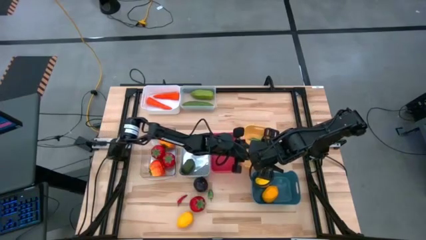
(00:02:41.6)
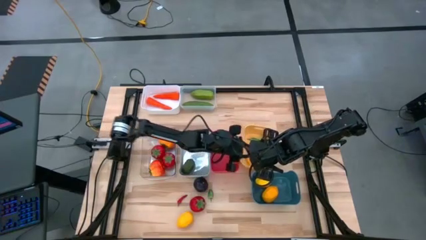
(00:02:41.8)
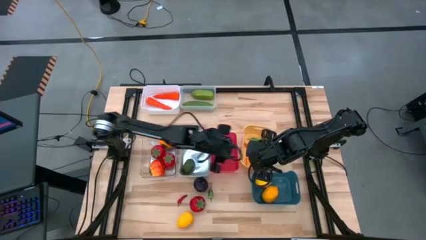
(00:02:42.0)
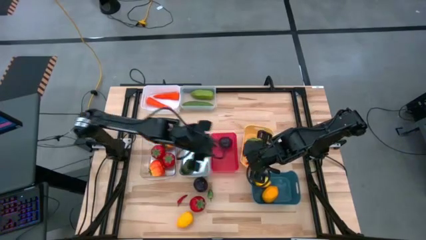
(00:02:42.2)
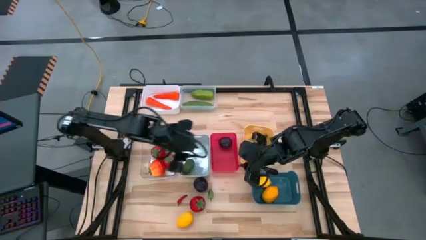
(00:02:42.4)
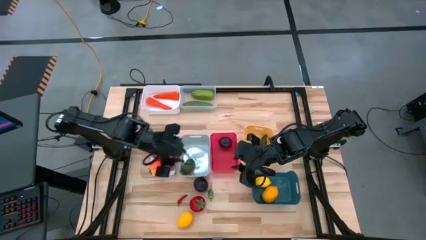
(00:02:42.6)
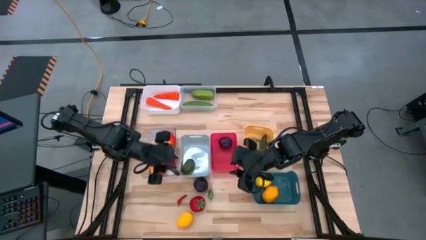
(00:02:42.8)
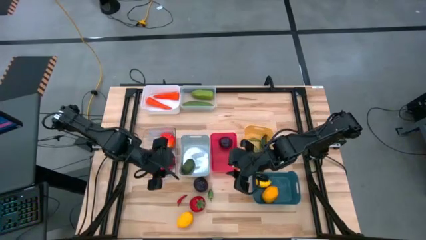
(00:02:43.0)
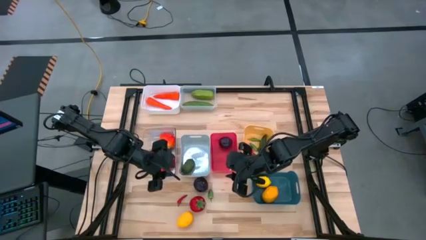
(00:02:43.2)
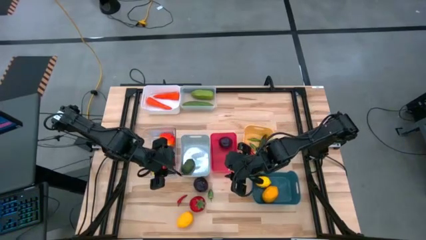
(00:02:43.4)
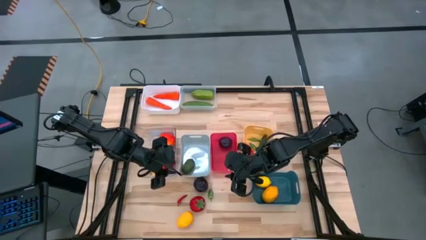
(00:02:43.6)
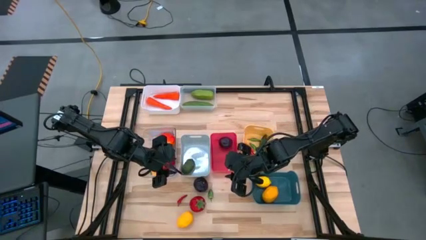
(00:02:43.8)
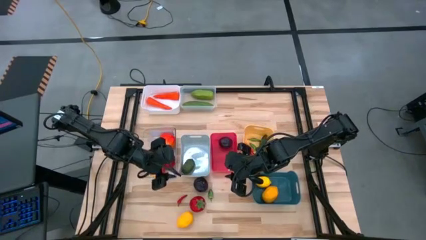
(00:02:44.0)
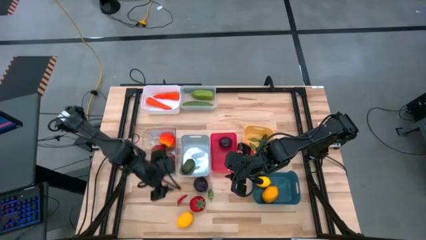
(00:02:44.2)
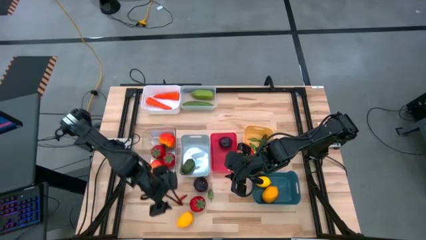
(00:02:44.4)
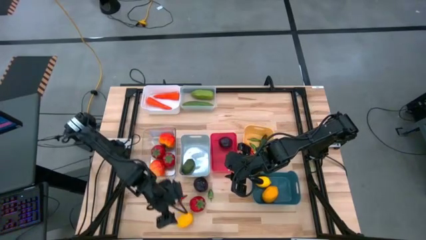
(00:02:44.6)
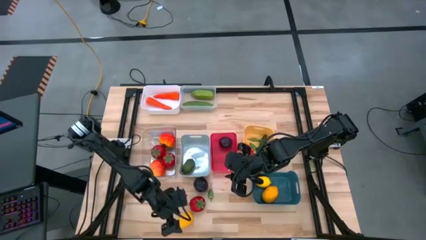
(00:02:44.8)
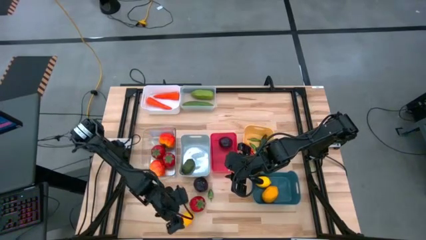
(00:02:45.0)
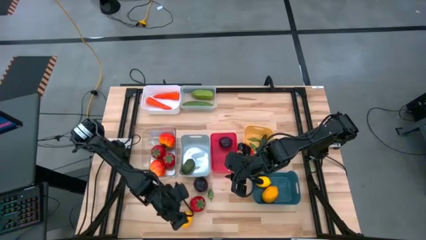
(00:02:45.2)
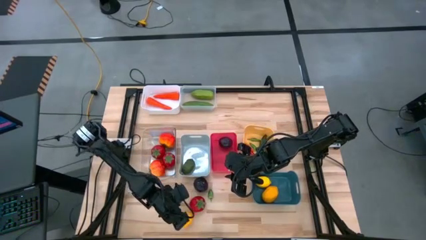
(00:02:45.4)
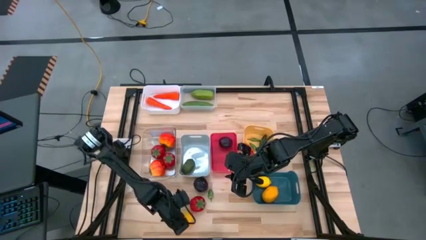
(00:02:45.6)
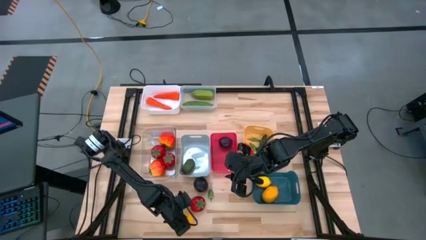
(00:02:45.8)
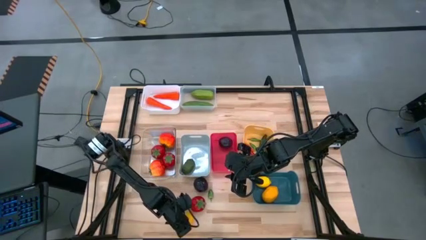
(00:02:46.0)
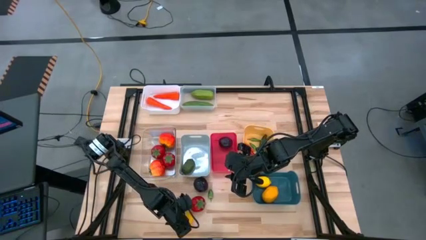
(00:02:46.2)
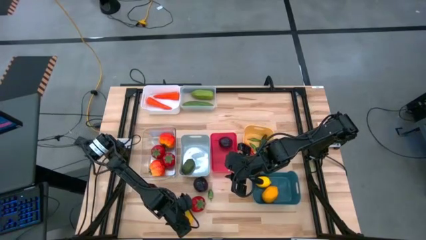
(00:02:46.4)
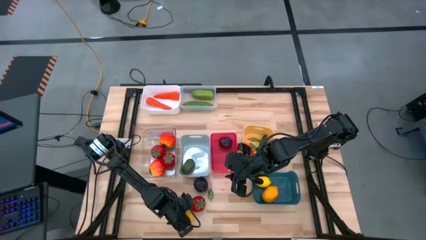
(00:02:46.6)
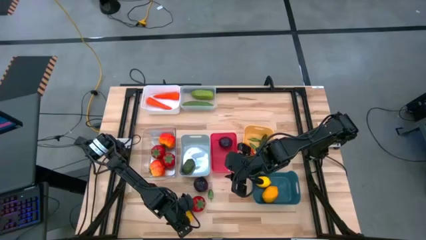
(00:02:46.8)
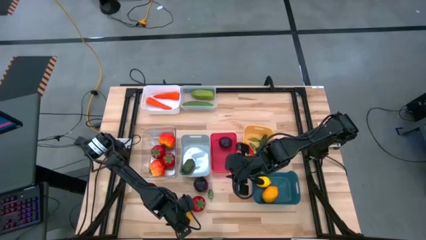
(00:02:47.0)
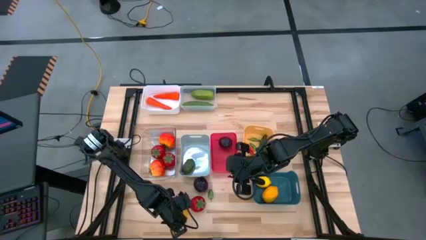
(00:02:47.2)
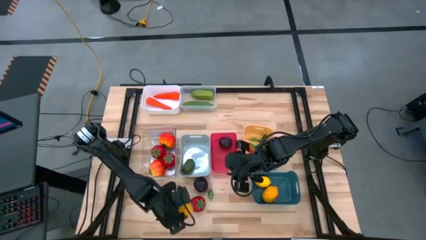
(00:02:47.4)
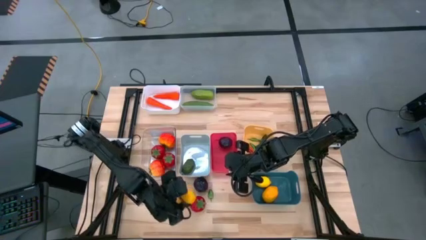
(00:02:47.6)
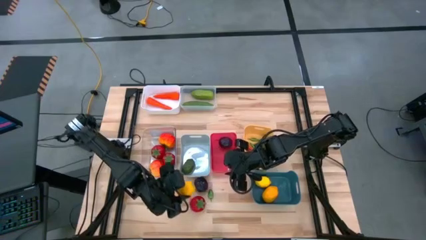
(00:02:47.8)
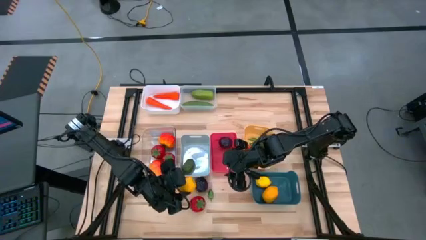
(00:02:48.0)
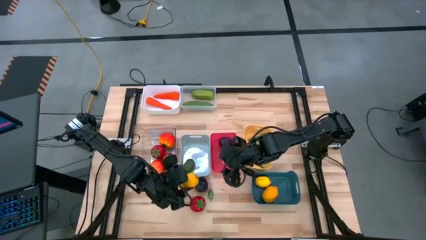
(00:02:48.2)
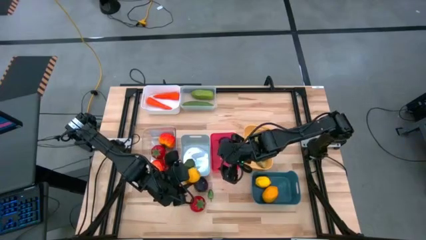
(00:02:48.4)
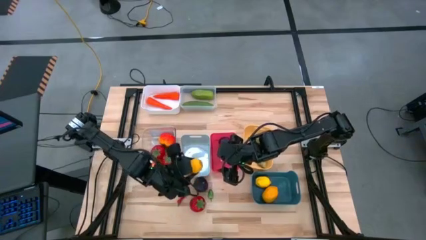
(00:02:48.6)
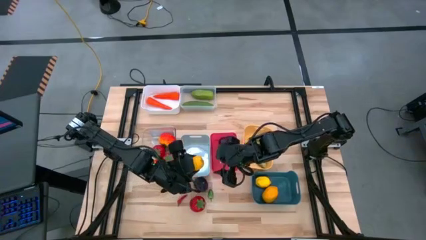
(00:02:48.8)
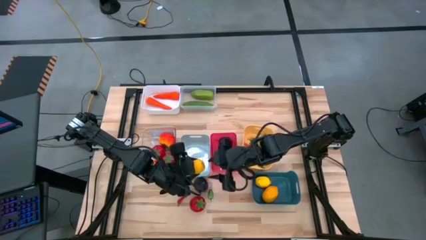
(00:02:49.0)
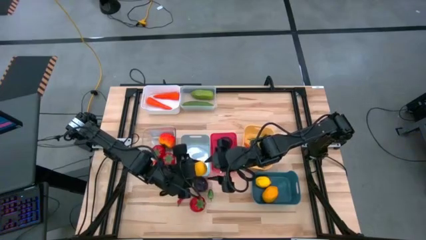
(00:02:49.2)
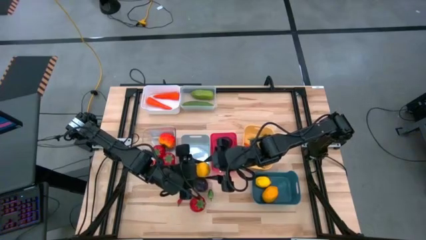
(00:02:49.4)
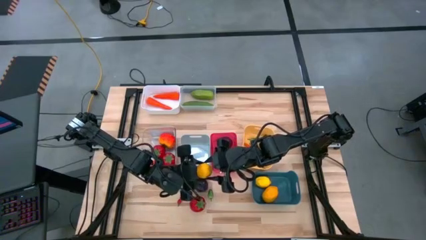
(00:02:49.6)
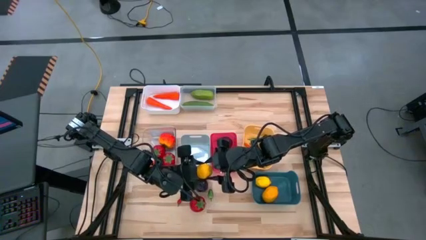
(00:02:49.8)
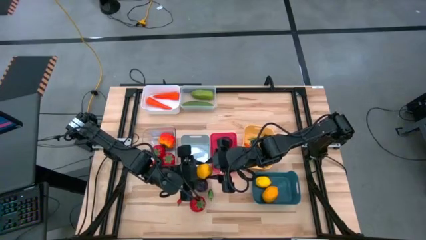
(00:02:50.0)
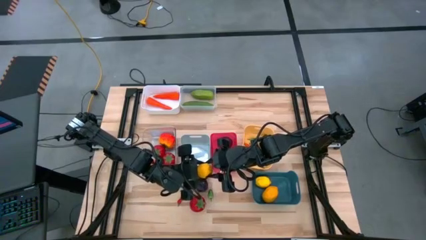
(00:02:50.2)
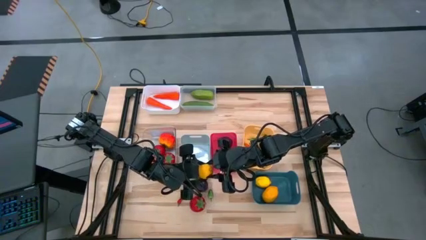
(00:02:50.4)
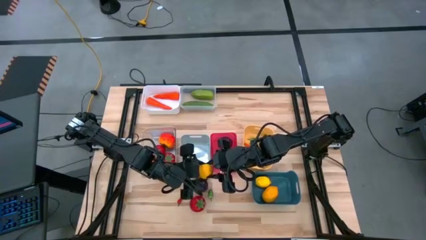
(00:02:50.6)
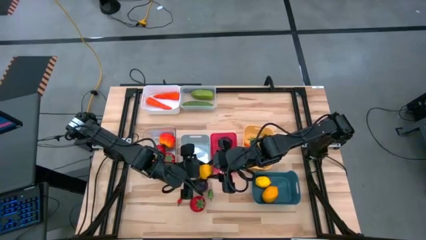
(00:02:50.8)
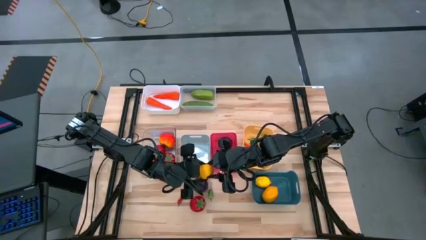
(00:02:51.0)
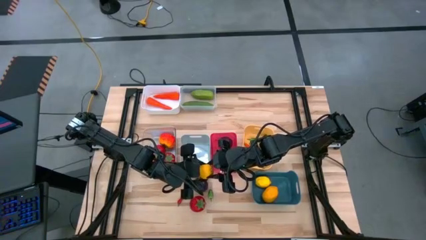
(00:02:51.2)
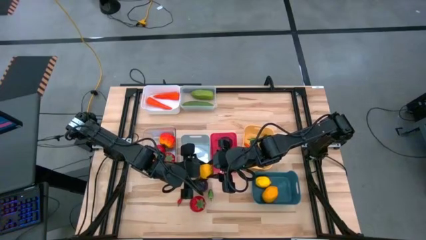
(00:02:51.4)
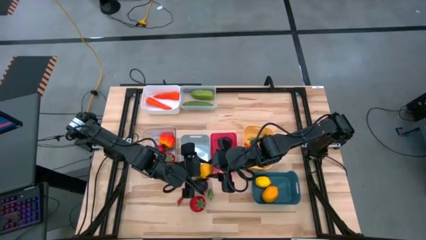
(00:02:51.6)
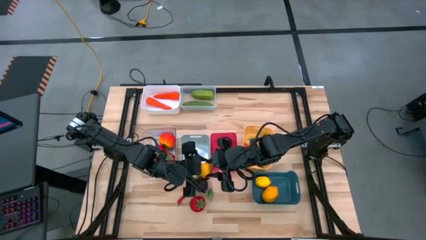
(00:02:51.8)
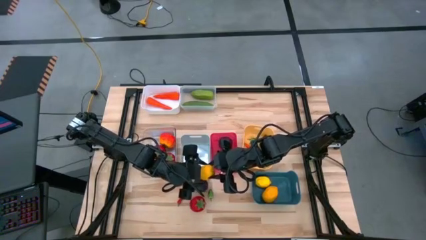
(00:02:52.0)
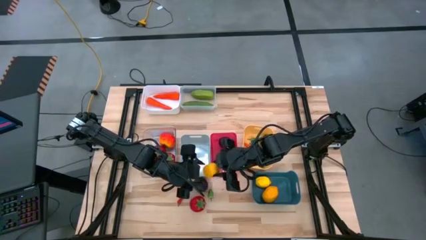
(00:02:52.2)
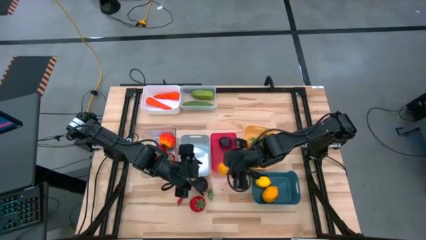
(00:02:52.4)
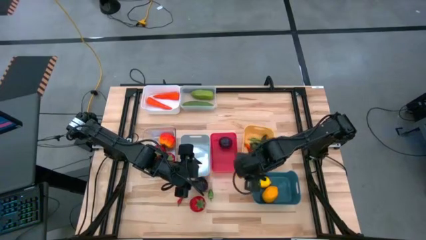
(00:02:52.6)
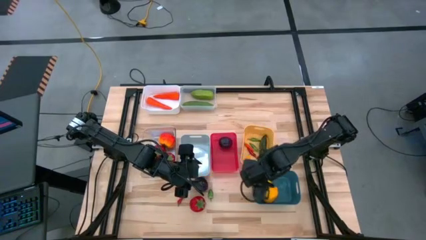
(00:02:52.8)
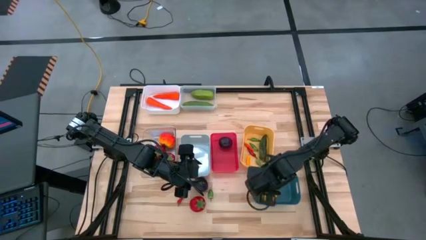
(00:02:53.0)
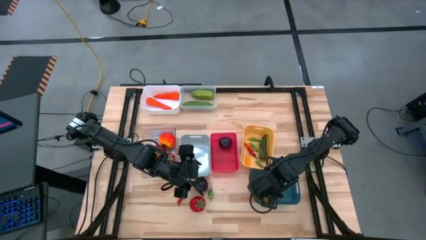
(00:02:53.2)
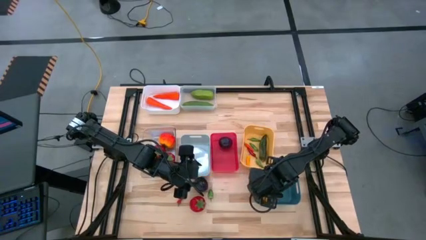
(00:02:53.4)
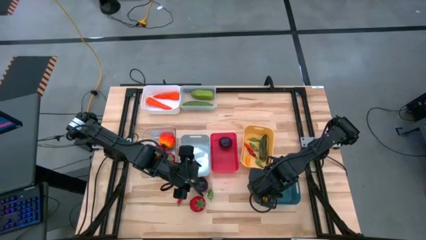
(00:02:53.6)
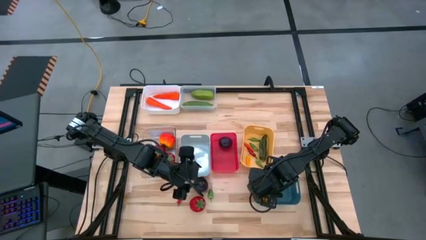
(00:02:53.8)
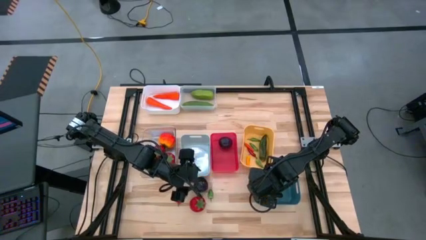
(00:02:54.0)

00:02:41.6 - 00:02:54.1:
Task: Sort produce into baskets
Put the lemon into the blue bin

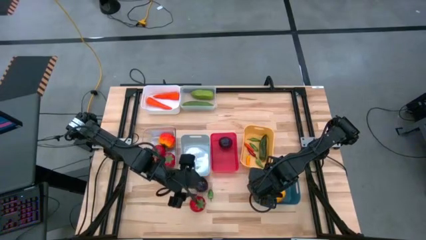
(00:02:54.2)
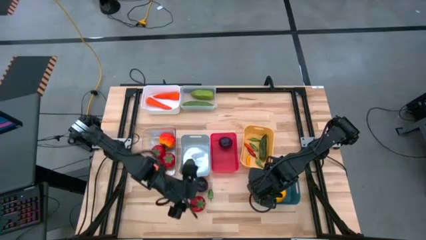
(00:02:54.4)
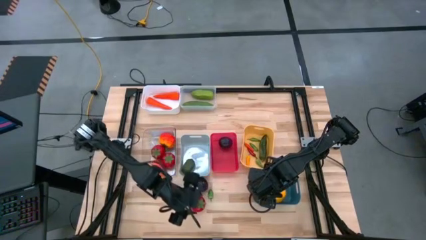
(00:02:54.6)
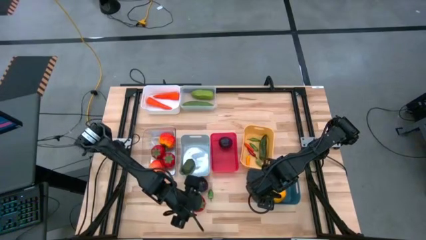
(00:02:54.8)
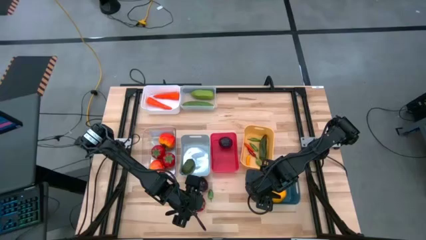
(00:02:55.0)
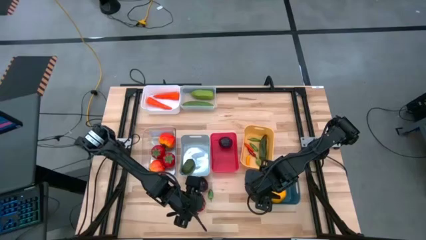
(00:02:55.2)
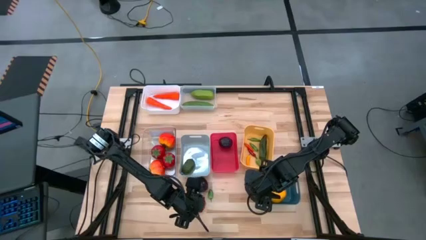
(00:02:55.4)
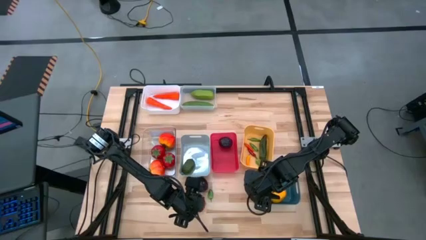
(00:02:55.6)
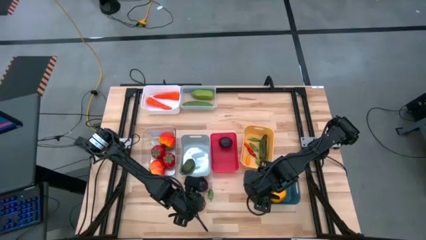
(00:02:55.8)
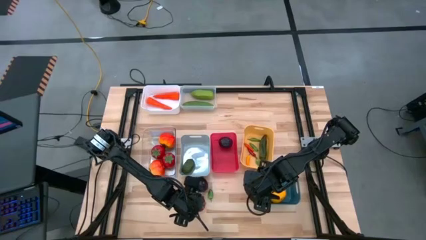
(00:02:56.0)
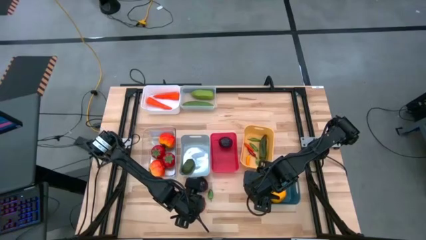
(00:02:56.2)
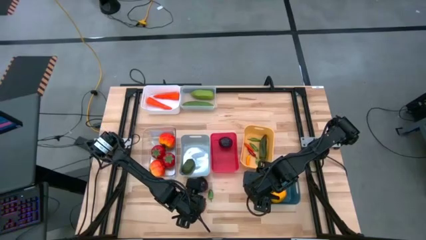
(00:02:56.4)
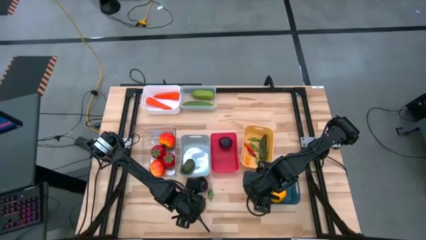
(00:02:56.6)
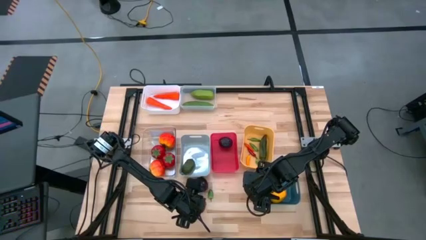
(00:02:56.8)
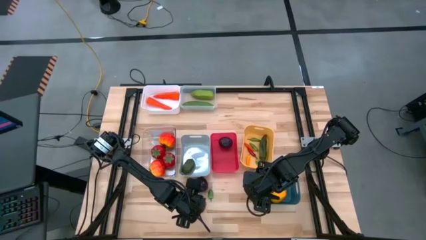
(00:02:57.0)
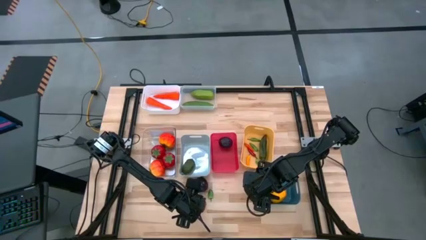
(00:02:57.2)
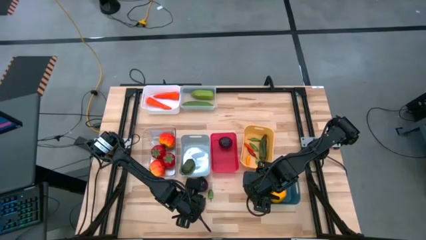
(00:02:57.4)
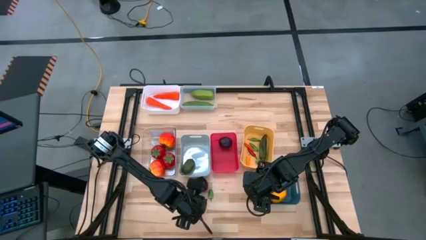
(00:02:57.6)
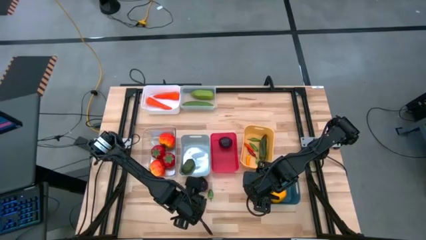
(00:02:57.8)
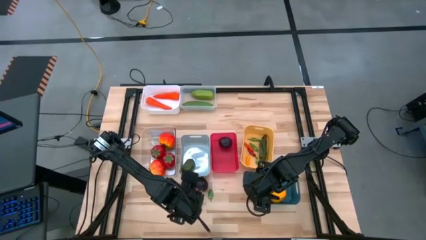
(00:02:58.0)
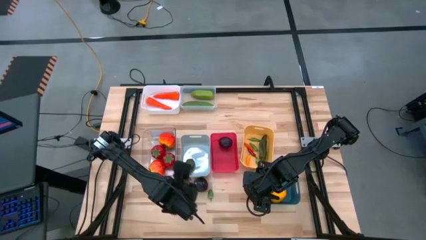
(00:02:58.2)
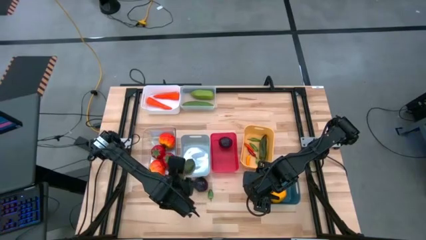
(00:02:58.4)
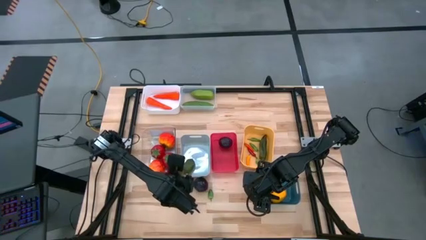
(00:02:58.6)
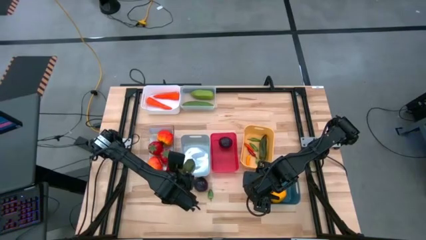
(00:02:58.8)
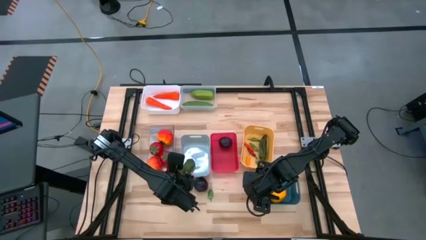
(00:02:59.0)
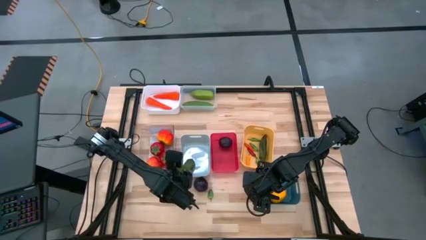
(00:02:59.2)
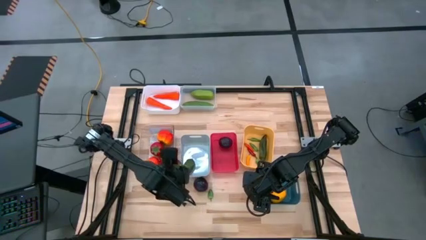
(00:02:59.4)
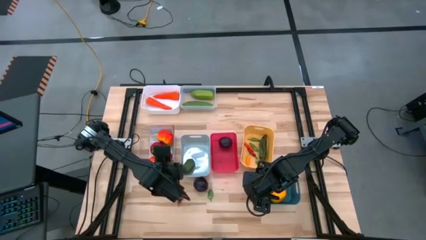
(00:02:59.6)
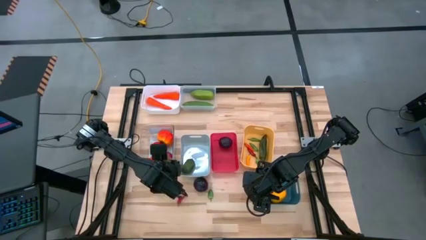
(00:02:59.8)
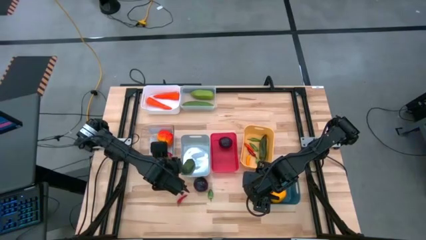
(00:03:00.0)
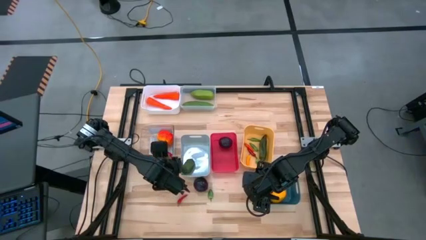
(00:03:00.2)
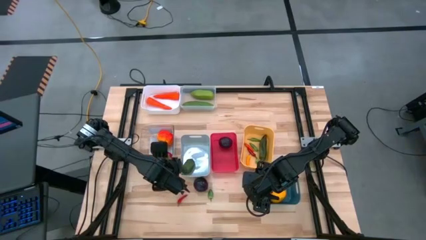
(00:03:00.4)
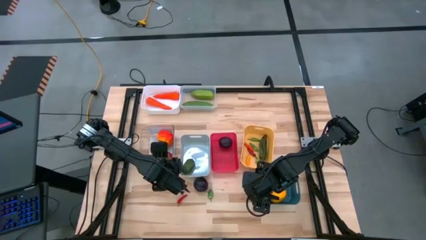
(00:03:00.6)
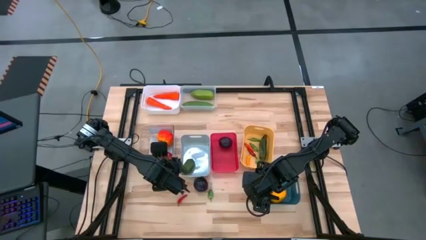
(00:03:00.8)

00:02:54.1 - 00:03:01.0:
Put the red tomato into the bottom transparent bin
